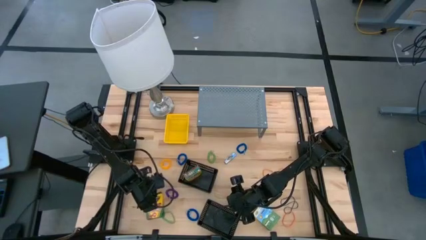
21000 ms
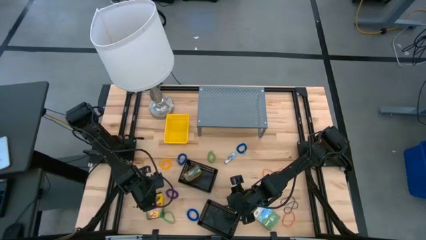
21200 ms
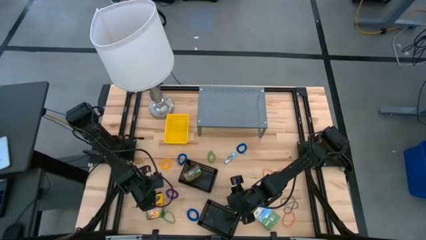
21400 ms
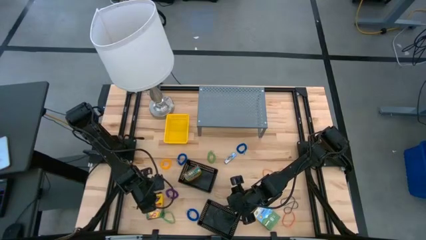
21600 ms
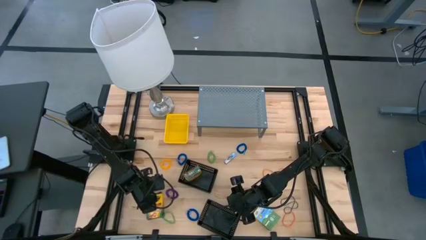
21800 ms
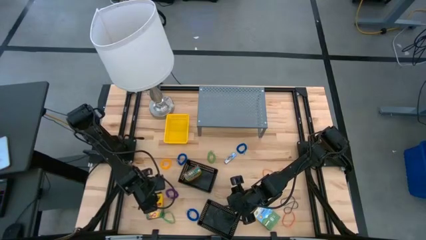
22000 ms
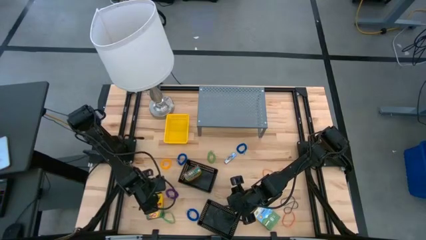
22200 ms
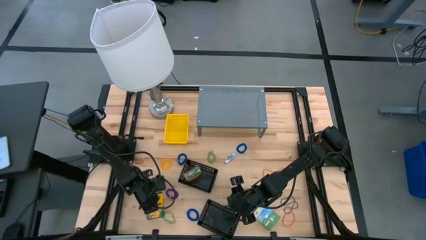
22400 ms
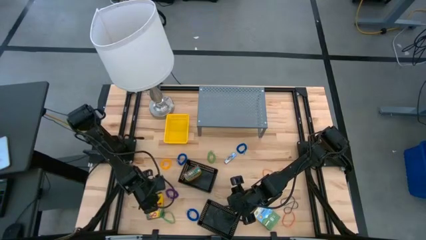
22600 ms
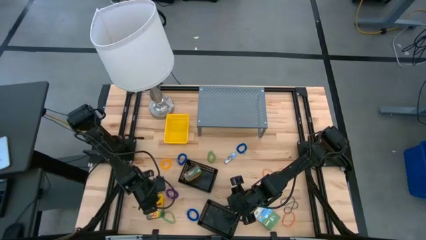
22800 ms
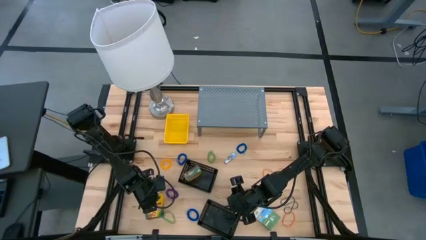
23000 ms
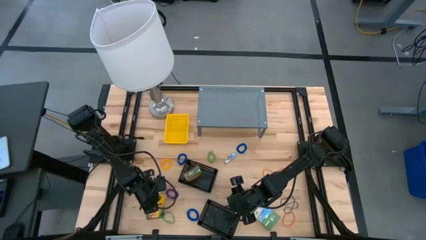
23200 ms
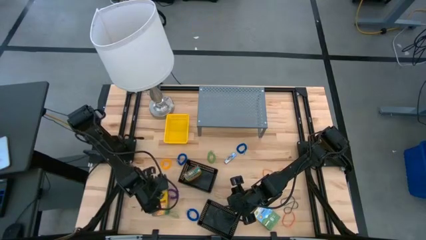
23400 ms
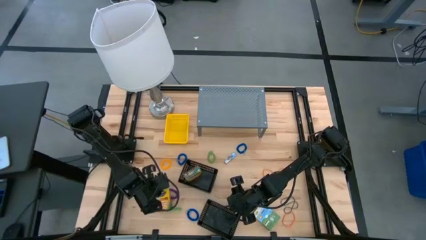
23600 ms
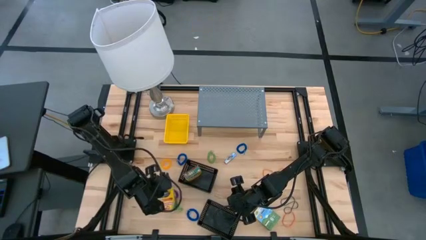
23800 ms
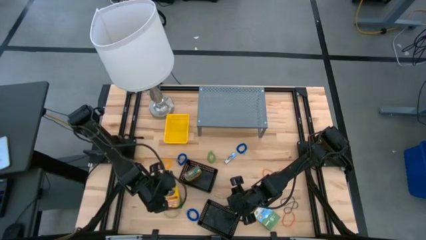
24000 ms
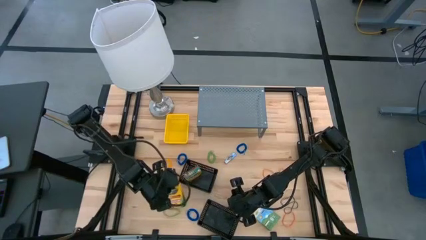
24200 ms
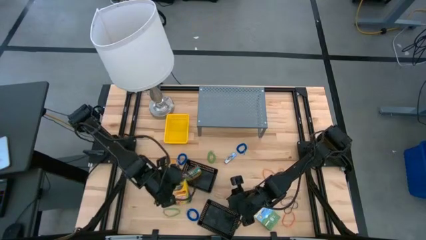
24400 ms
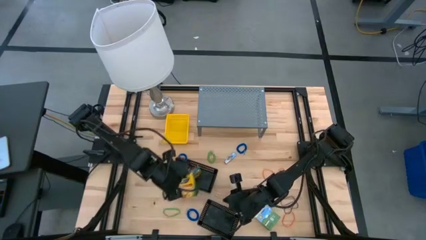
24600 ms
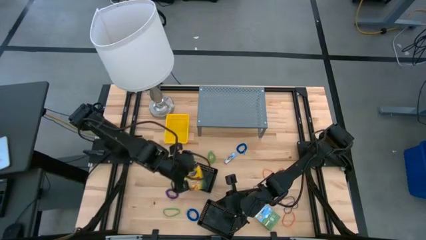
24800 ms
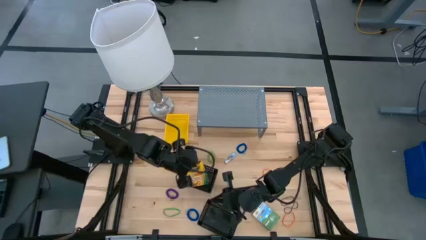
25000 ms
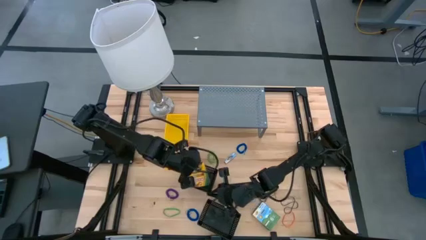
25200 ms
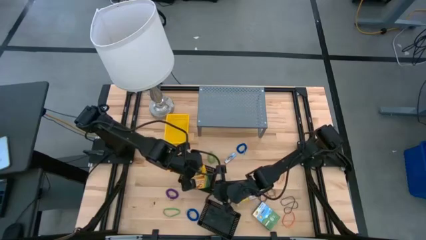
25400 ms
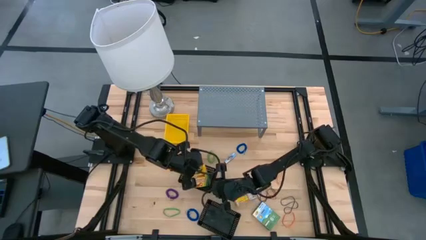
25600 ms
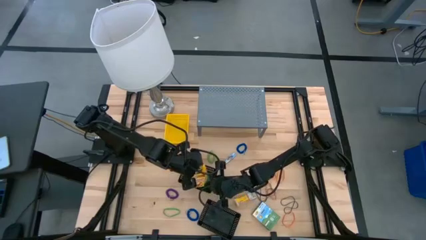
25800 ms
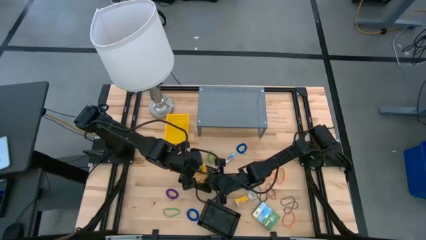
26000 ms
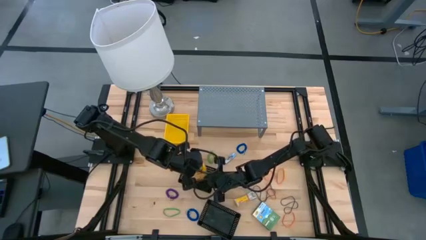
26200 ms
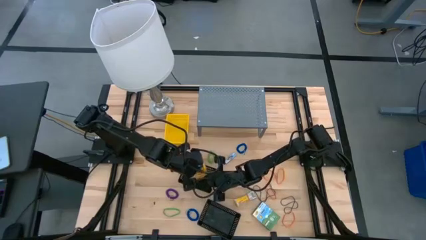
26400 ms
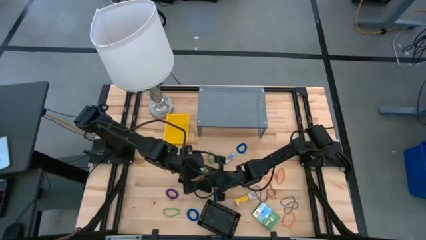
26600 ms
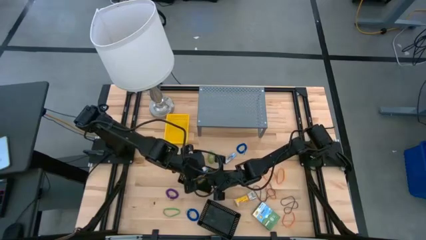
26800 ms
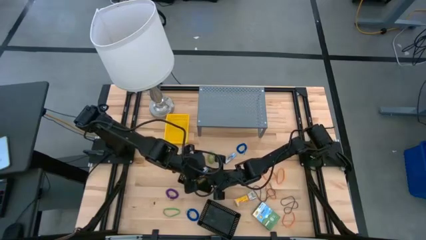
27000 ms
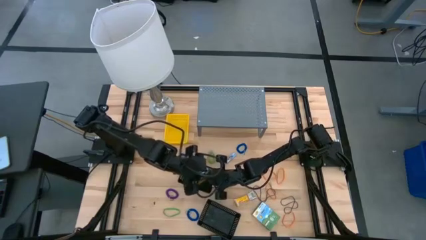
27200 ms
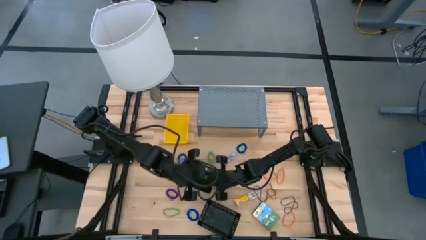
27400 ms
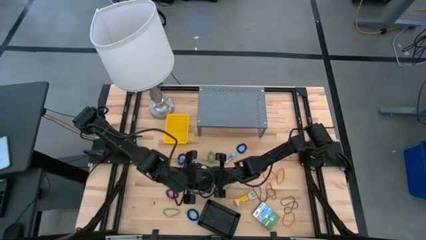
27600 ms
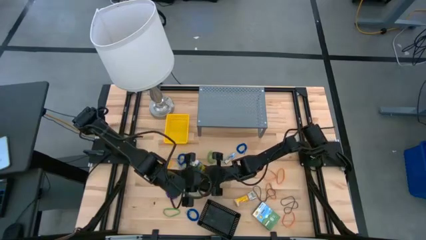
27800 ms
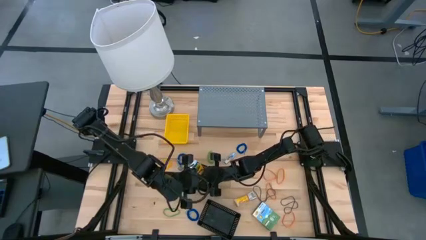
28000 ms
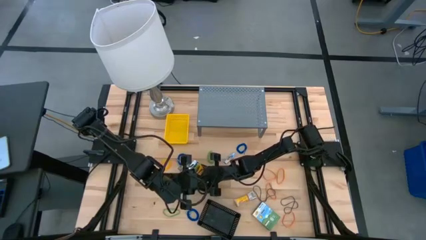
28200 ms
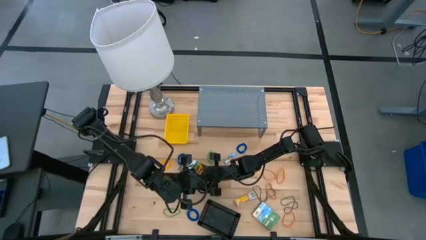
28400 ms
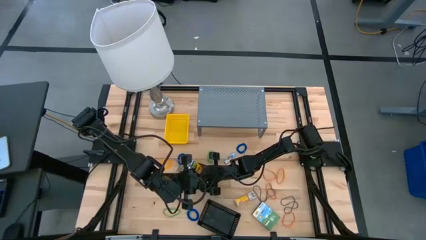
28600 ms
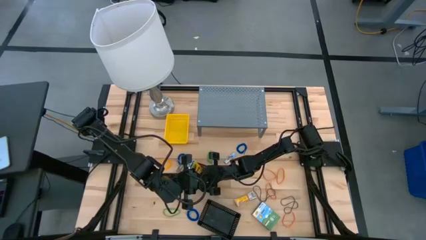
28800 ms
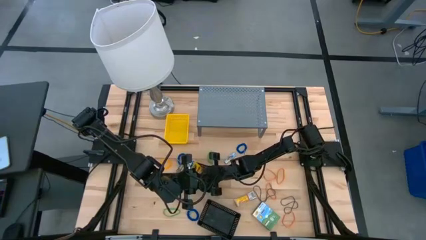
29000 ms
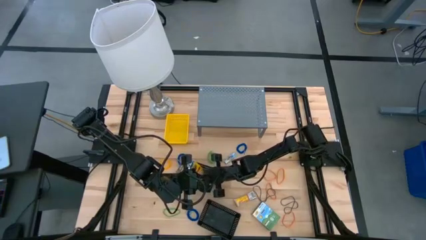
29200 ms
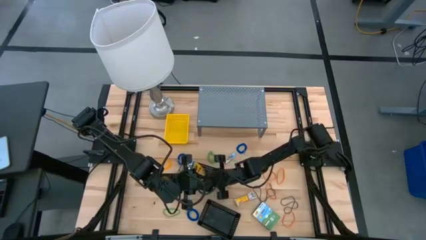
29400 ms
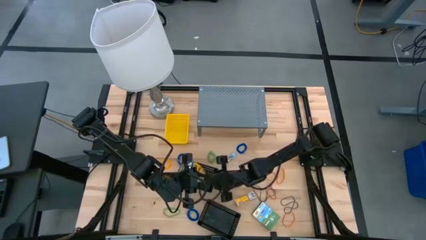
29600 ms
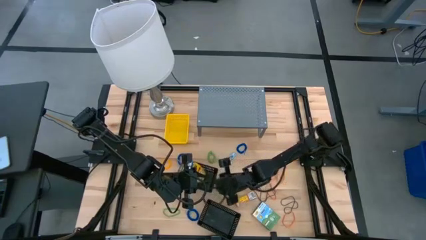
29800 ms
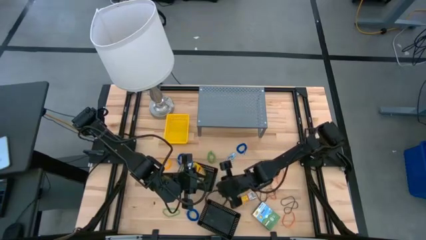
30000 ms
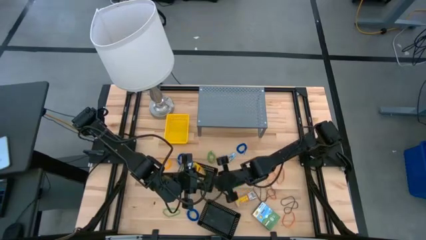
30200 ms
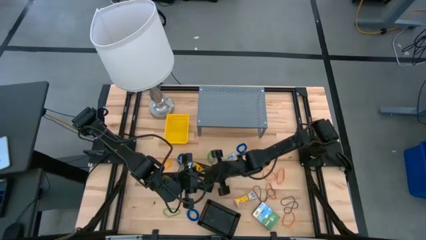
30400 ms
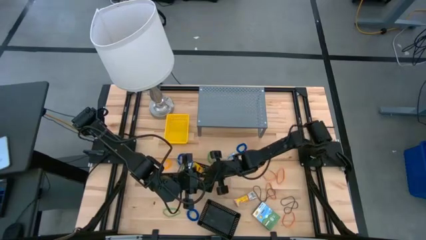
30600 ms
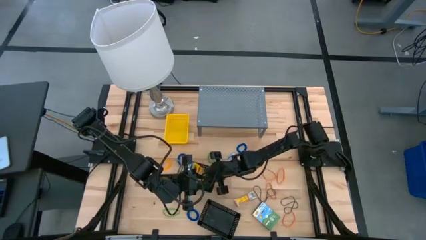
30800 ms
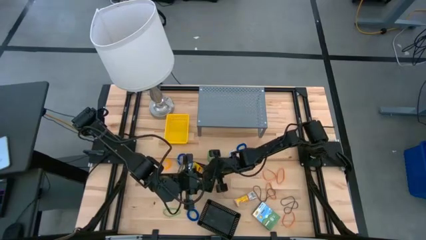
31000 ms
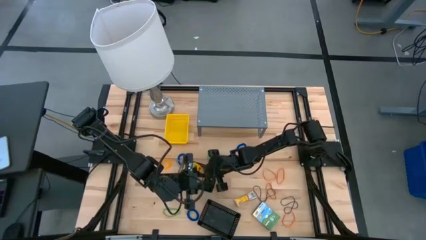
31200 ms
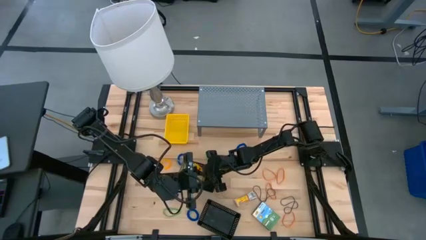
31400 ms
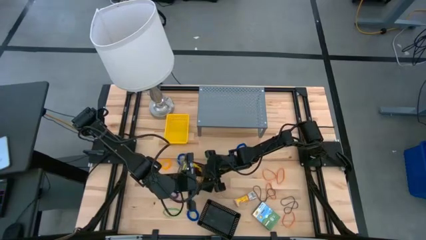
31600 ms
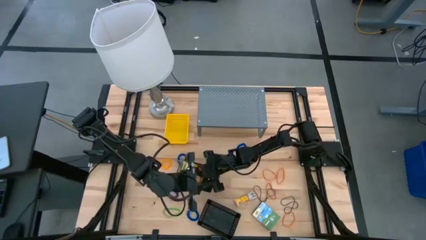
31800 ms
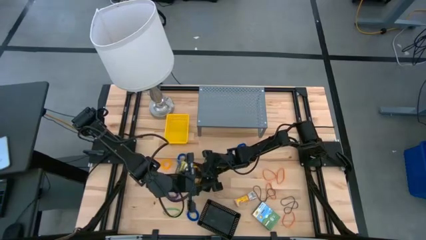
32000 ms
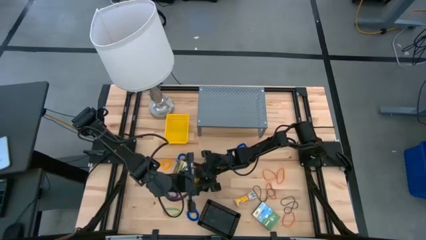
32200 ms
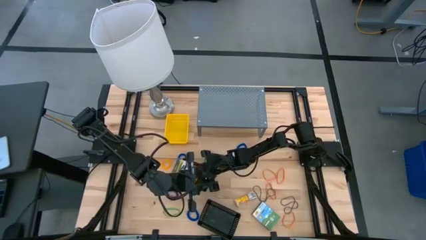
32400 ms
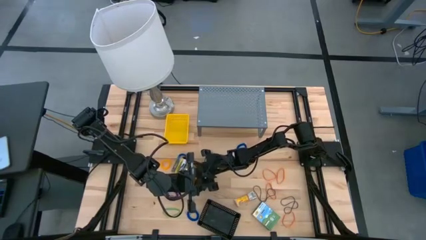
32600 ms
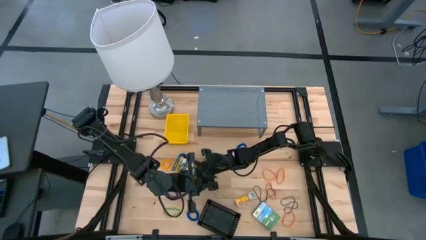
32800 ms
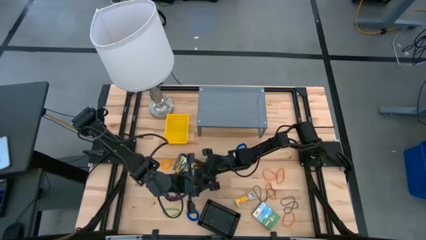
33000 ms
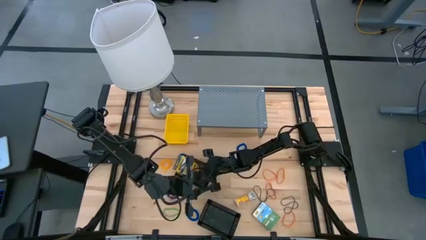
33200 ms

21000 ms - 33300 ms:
Task: Pick & Place Office Desk Supplies
Put the large yellow crayon box into the top black bin
